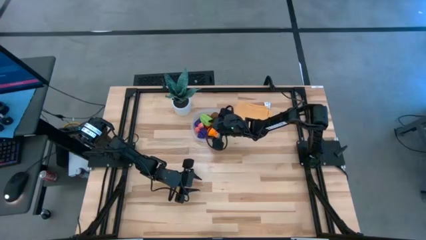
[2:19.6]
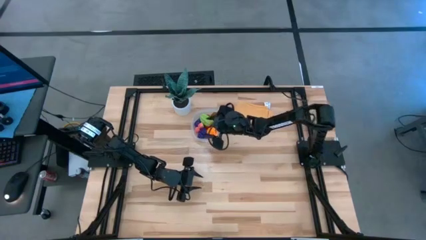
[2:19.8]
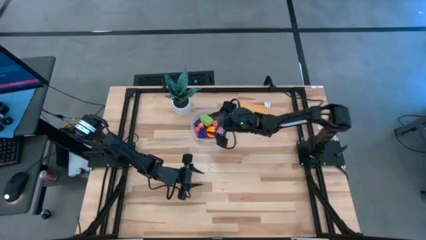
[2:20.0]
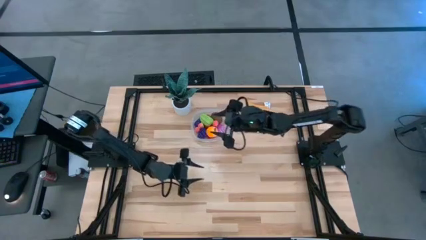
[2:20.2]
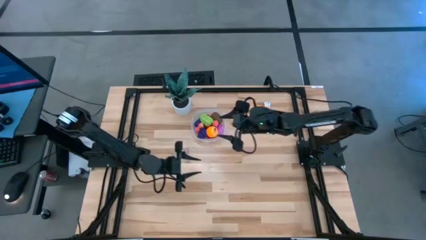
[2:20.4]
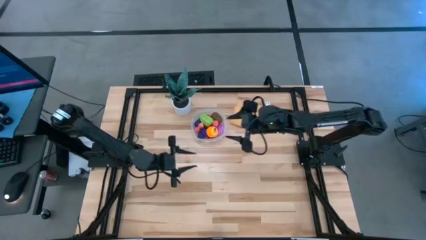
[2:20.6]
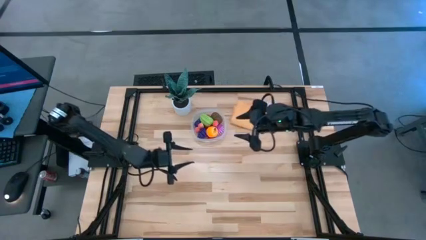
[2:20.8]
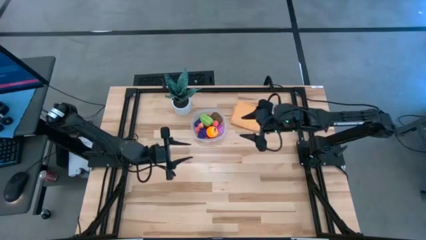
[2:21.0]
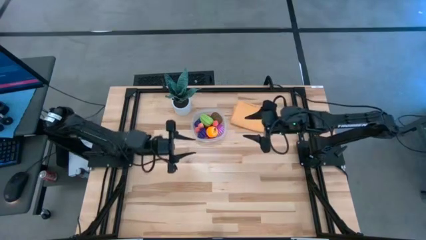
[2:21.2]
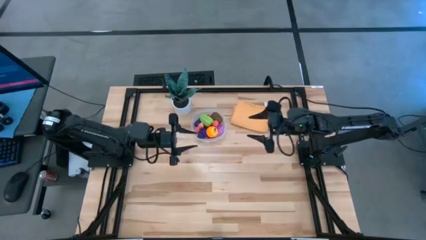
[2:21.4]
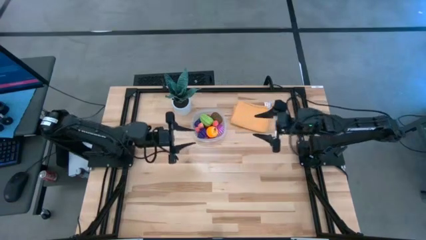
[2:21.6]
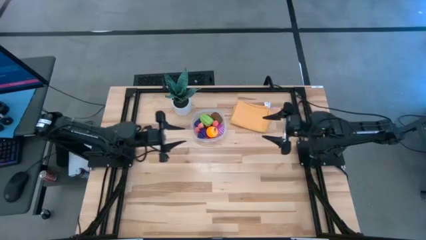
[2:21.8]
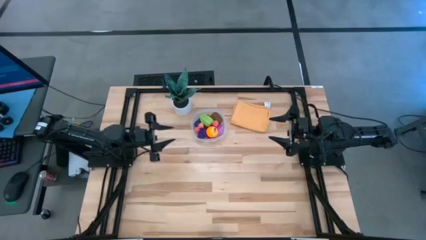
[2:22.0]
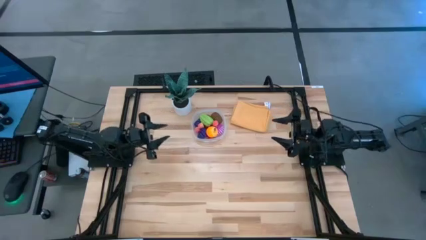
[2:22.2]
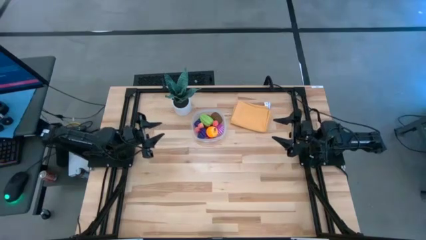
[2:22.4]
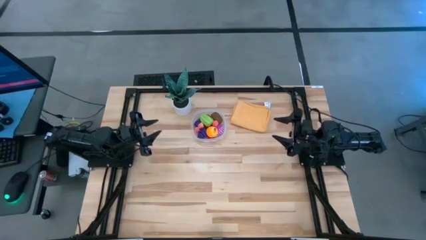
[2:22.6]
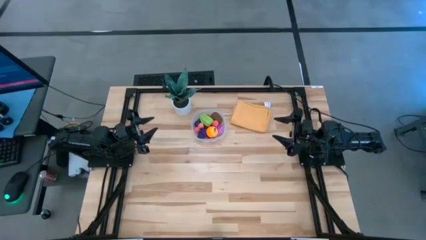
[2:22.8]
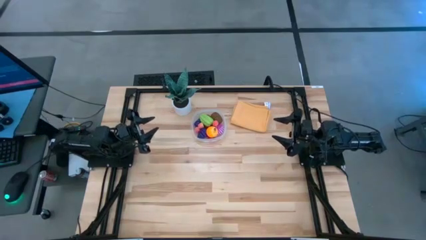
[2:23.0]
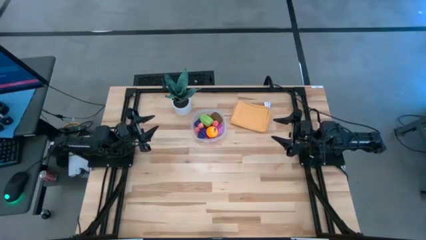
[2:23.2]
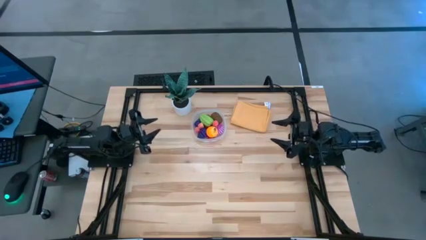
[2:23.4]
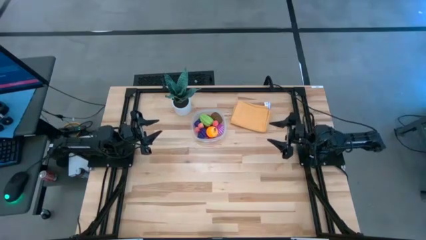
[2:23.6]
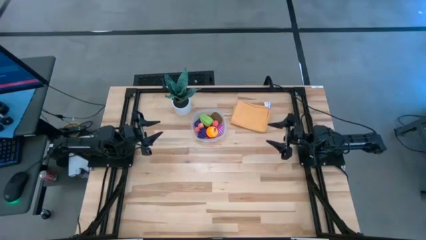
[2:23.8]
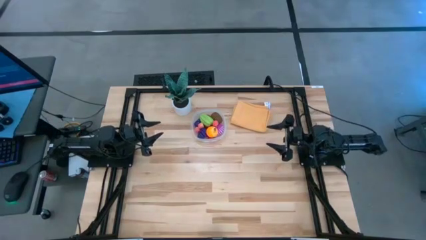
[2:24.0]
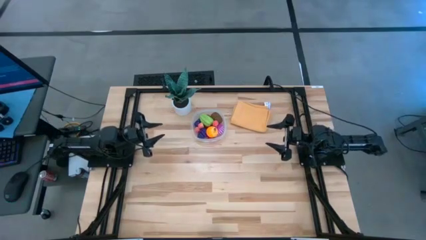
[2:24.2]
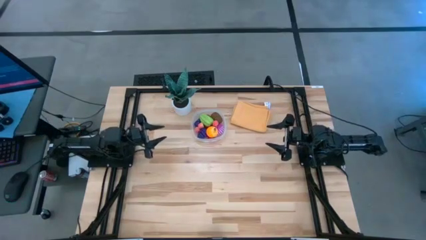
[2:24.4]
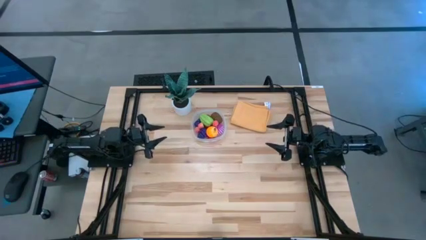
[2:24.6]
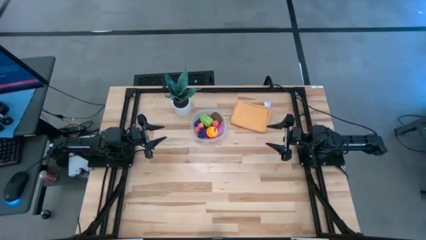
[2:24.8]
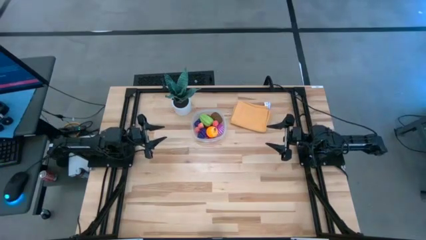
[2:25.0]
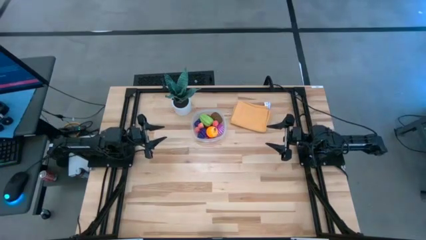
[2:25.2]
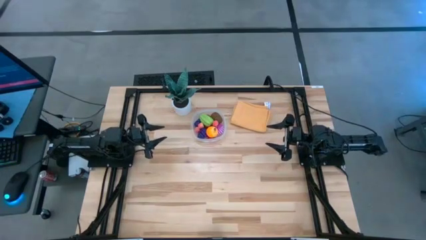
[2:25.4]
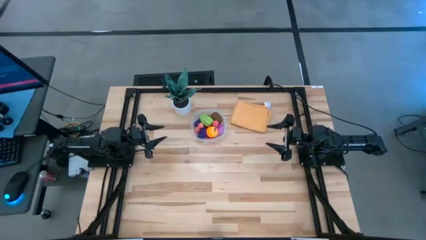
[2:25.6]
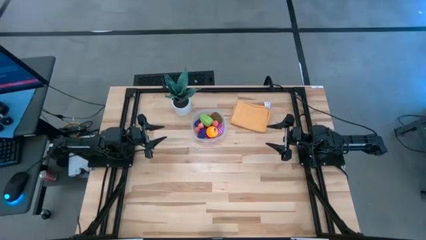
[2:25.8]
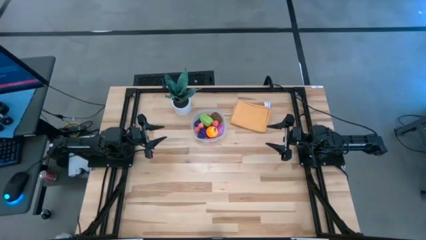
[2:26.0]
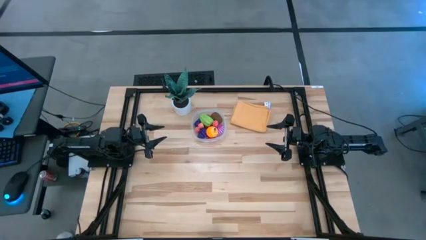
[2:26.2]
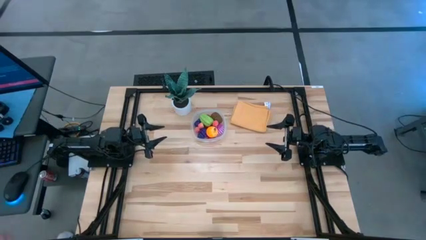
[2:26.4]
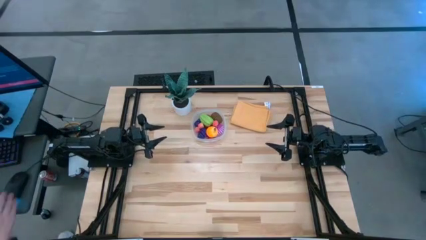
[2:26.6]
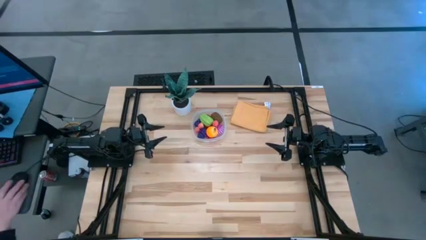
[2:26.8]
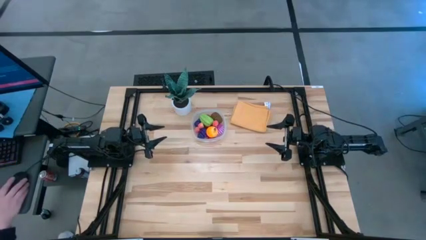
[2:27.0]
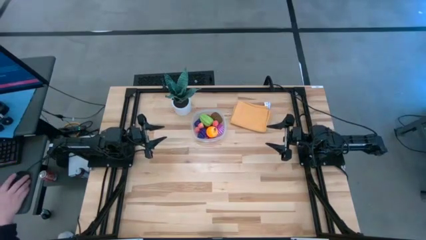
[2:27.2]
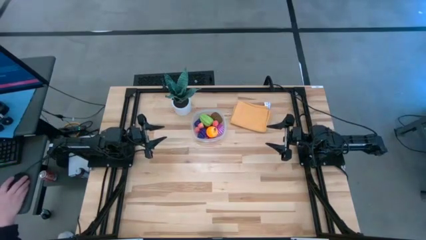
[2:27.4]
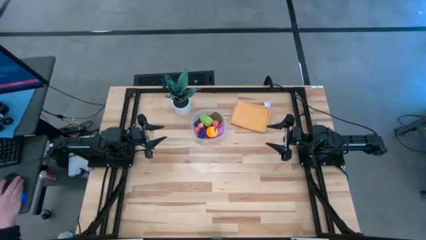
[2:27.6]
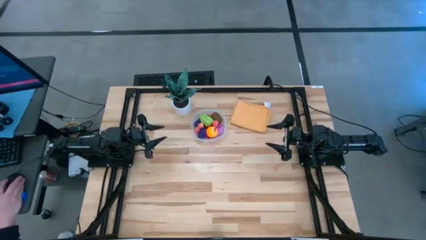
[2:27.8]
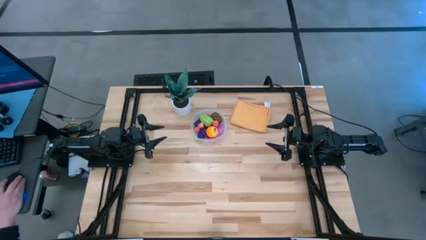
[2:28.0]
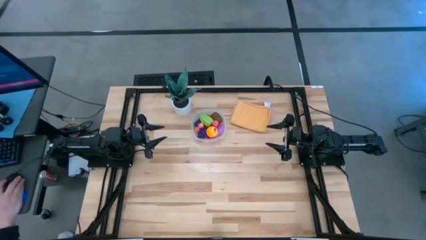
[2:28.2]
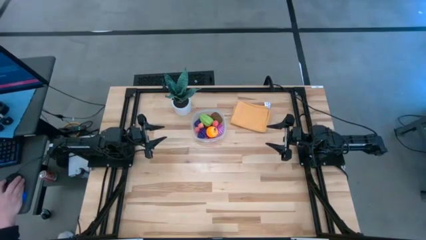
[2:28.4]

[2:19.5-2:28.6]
Task: Pick and placing Produce into tupperware
Return to Home Position

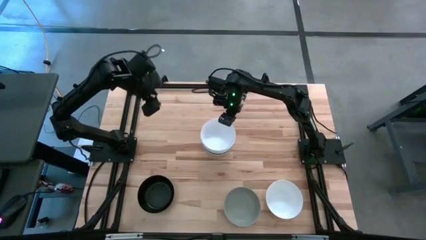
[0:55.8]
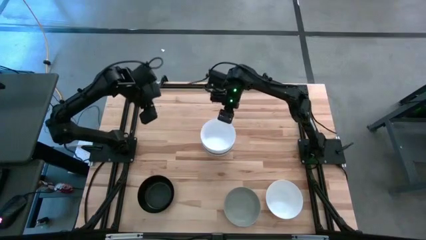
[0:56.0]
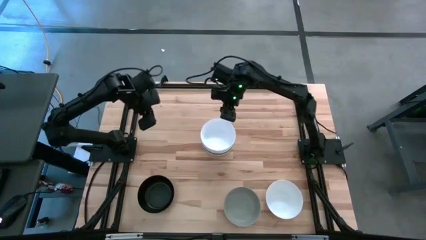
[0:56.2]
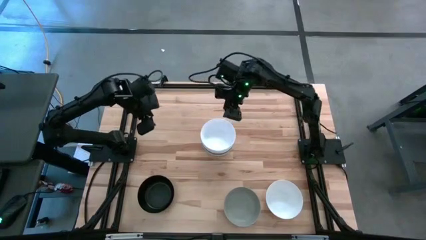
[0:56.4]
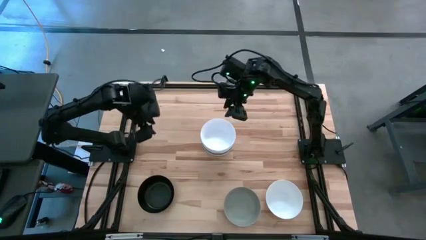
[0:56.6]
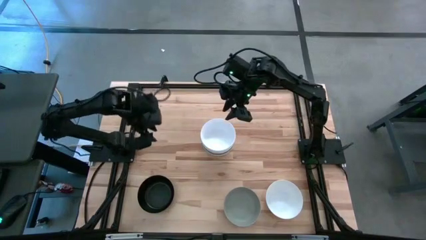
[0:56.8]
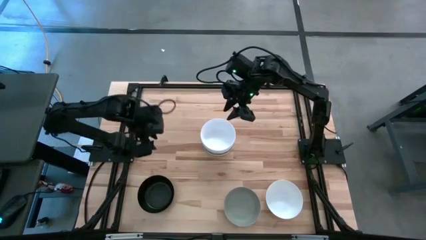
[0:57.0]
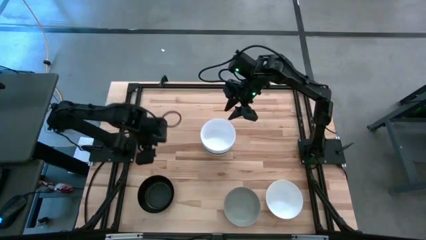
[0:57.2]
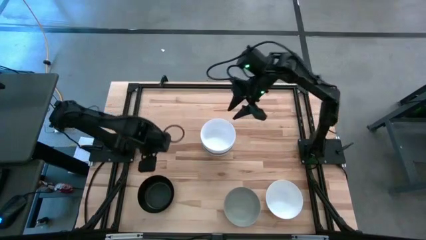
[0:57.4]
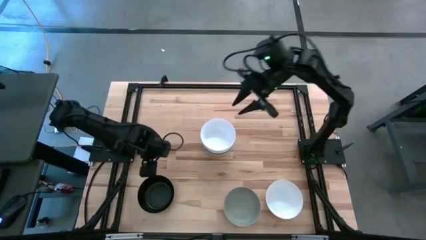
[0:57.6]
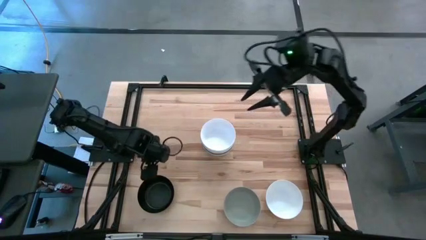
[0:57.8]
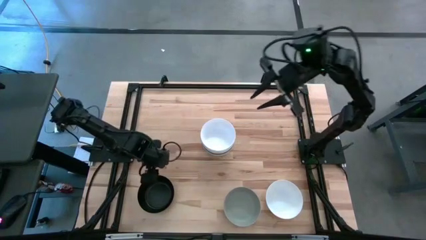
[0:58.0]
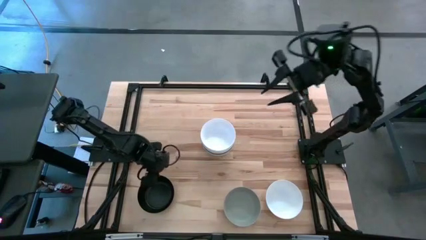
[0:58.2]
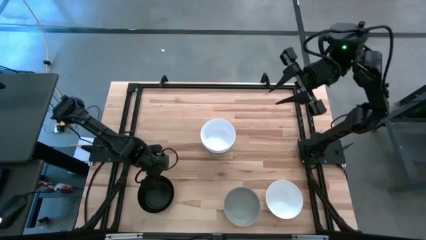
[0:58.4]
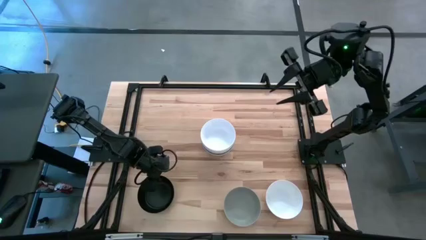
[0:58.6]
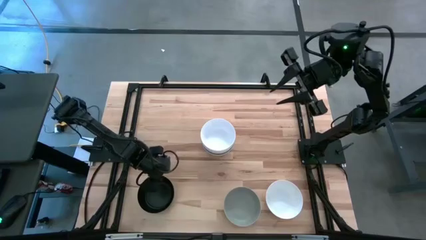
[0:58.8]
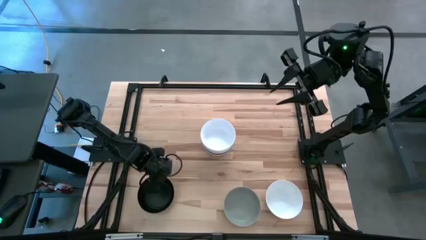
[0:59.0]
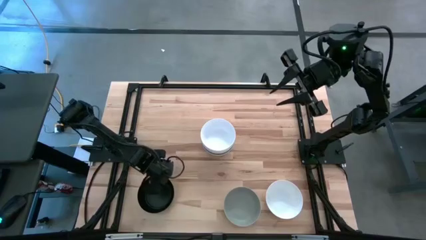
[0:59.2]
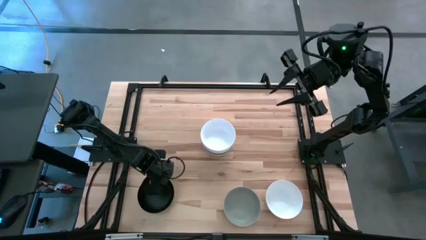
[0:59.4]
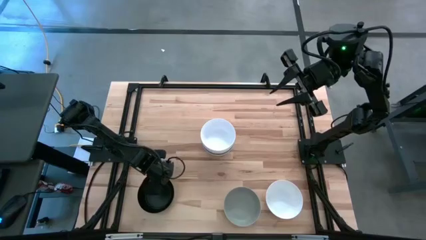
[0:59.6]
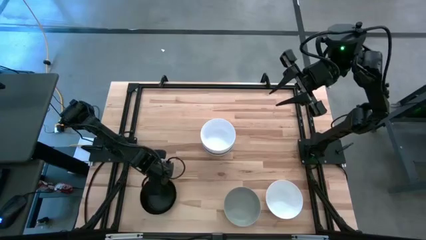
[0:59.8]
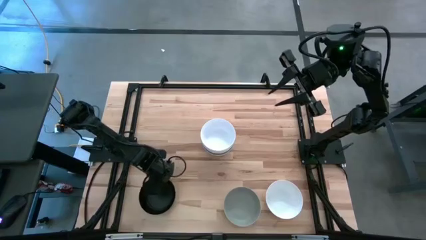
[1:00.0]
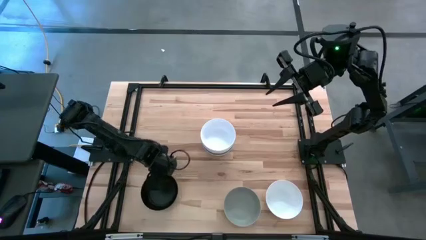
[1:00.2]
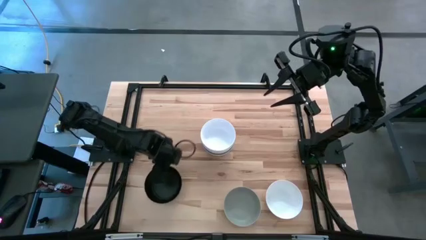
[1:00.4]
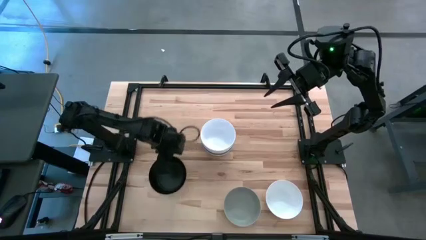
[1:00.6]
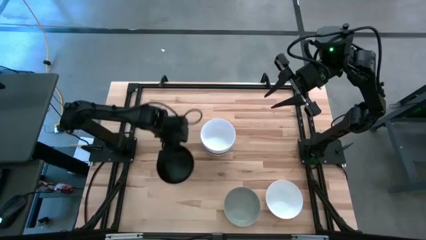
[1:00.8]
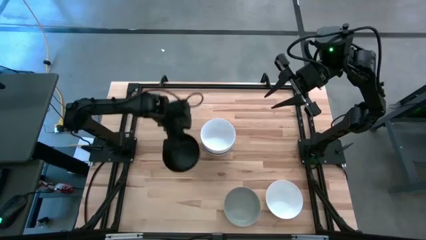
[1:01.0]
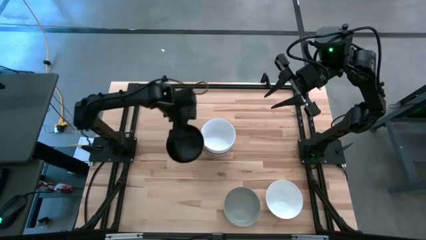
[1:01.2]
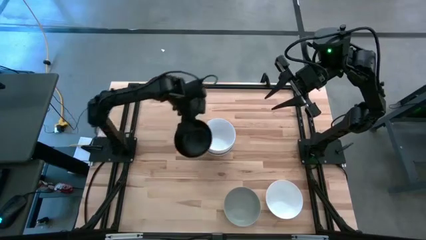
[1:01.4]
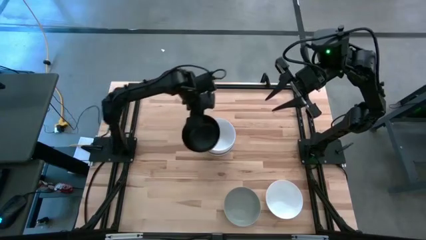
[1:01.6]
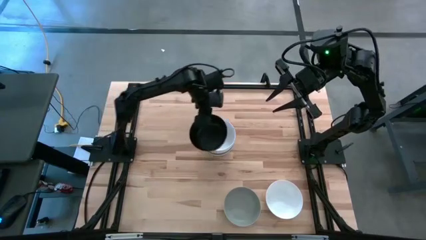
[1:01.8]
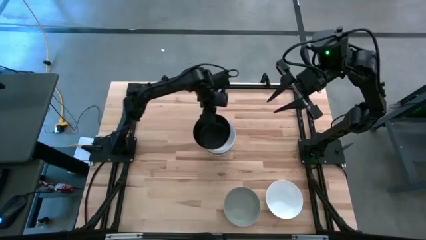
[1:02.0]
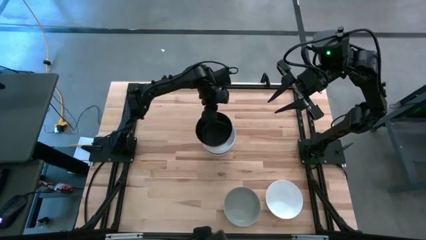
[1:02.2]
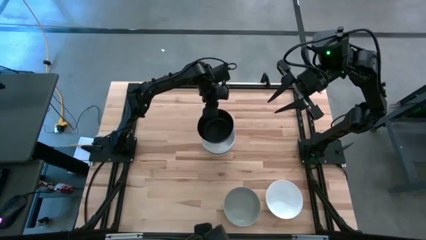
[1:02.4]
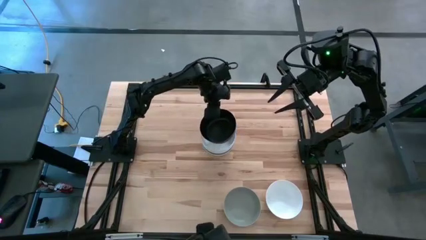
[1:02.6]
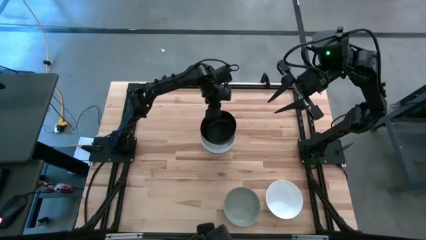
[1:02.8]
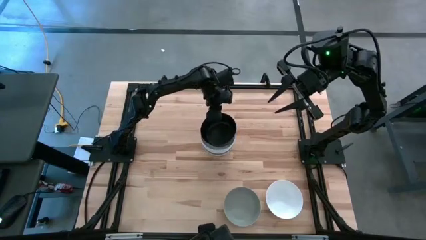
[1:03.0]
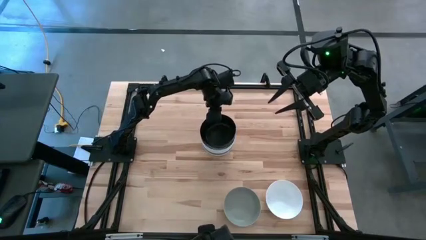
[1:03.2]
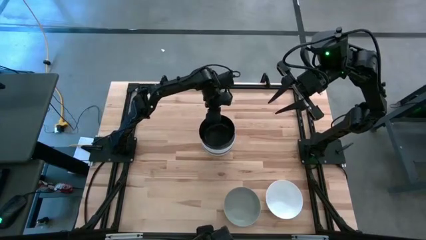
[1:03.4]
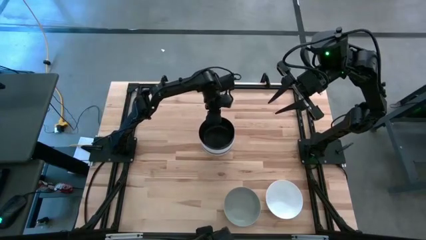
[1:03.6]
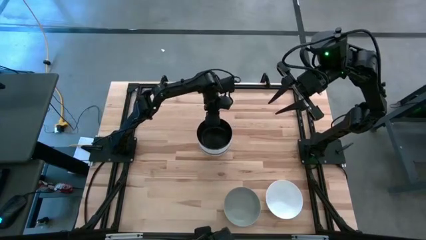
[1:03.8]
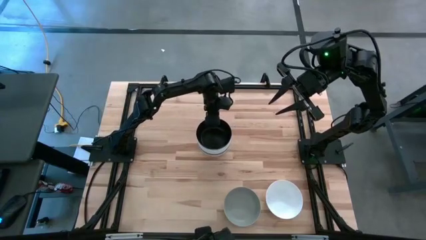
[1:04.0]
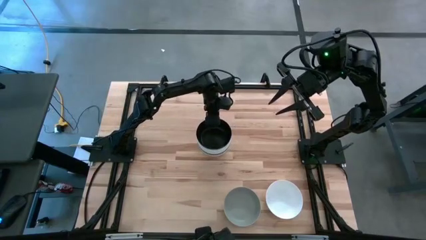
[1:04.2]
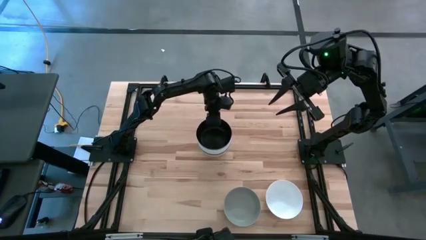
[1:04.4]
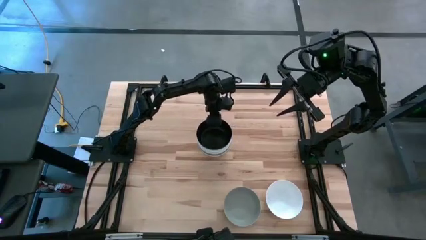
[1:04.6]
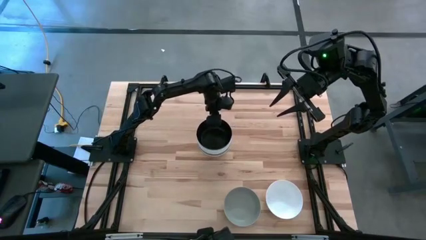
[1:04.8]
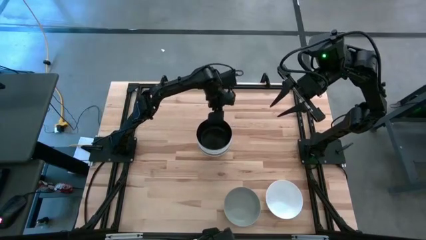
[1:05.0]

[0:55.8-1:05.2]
Task: Nest bowls inside each other
Stack the black bowl on top of the white bowl
